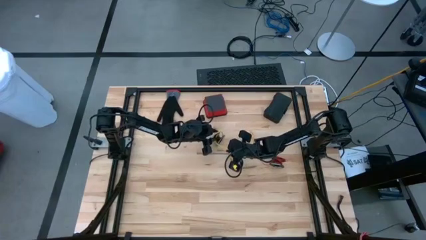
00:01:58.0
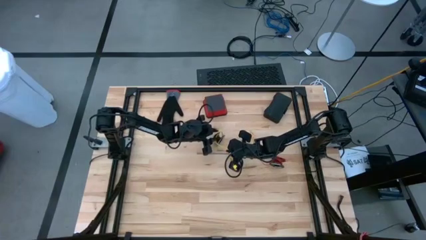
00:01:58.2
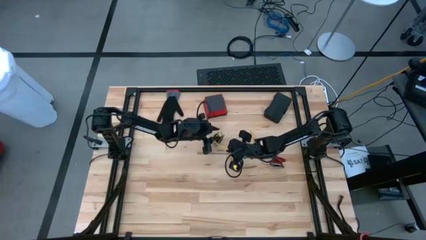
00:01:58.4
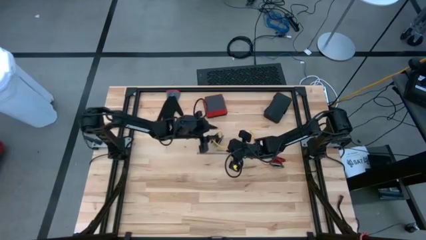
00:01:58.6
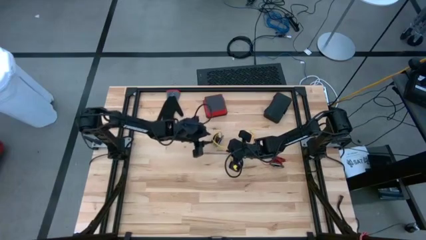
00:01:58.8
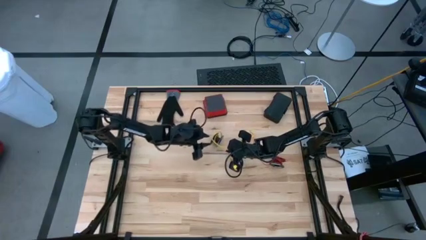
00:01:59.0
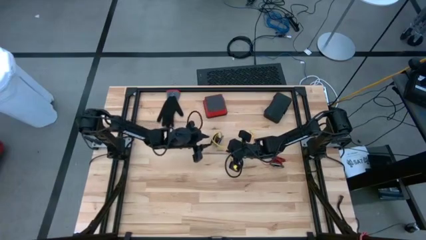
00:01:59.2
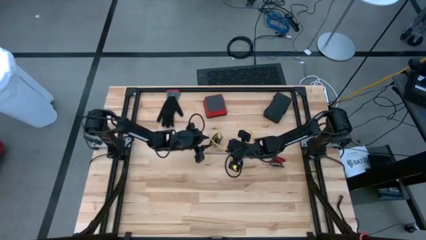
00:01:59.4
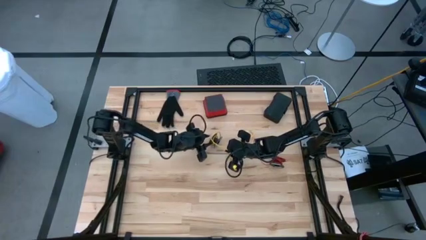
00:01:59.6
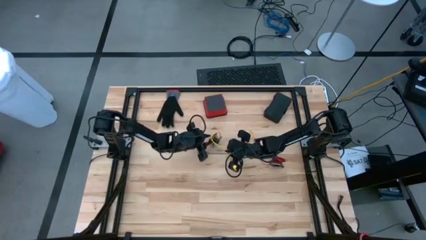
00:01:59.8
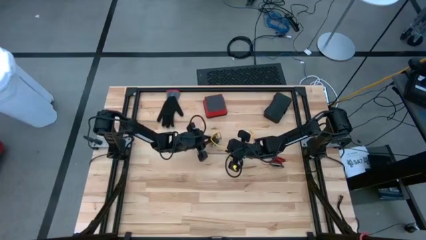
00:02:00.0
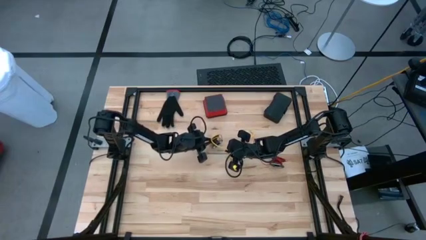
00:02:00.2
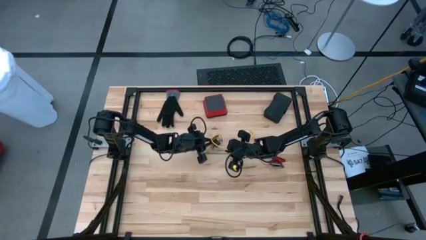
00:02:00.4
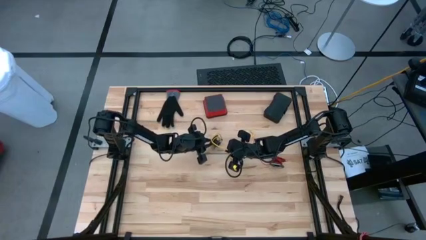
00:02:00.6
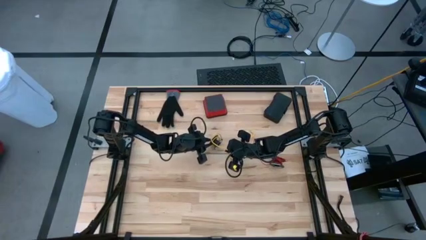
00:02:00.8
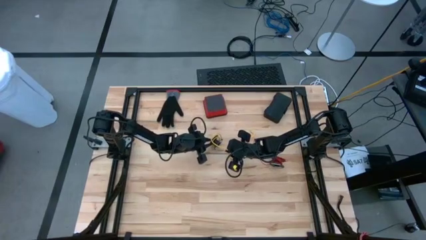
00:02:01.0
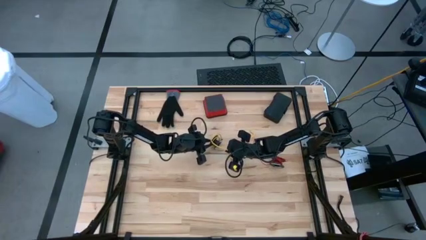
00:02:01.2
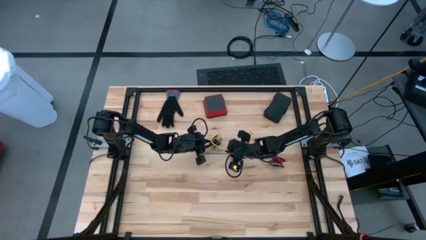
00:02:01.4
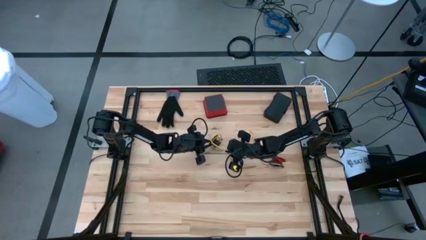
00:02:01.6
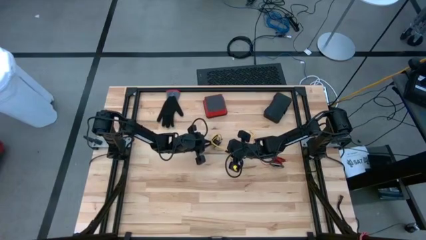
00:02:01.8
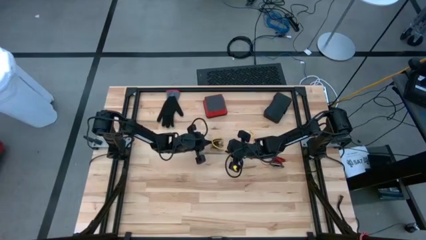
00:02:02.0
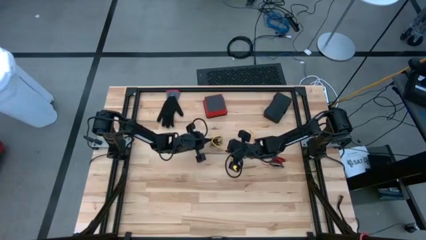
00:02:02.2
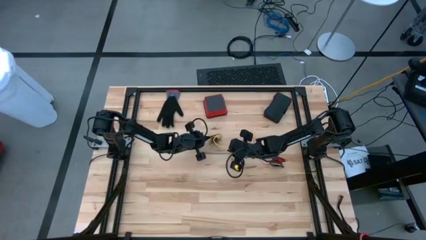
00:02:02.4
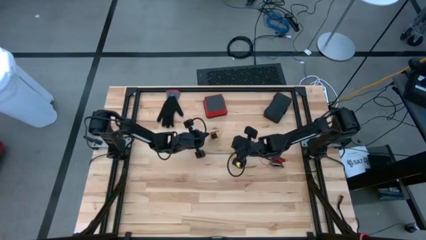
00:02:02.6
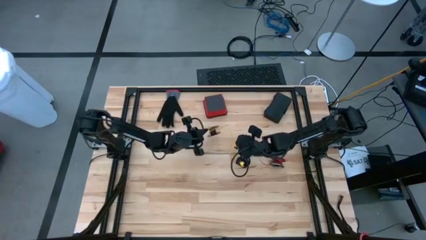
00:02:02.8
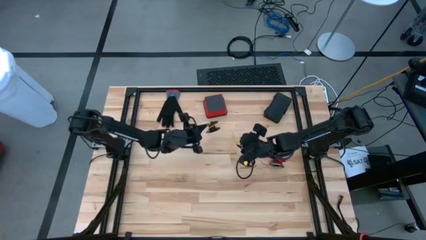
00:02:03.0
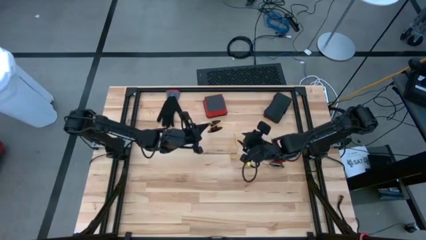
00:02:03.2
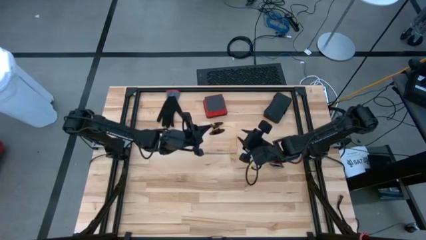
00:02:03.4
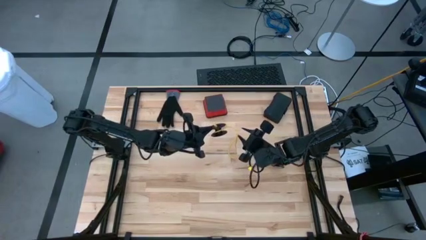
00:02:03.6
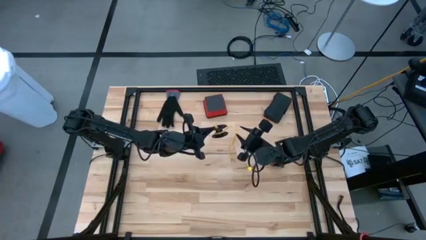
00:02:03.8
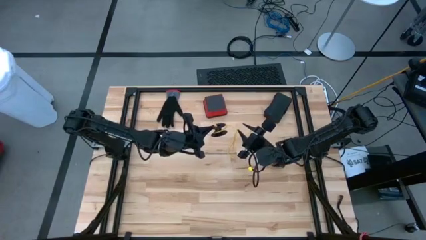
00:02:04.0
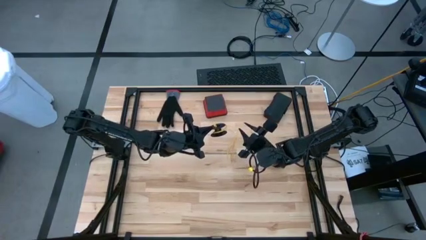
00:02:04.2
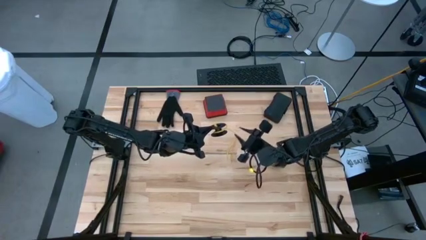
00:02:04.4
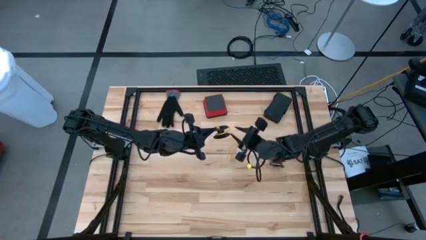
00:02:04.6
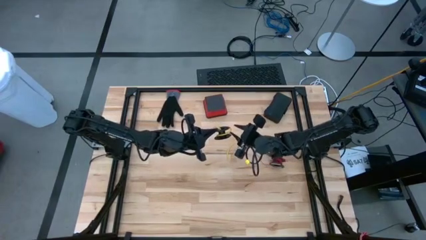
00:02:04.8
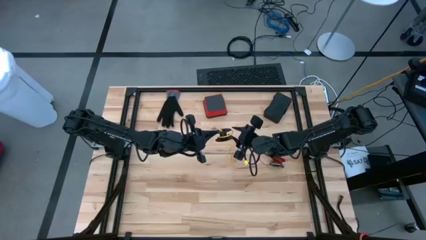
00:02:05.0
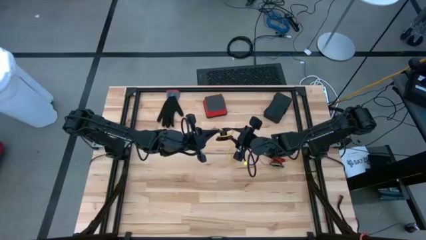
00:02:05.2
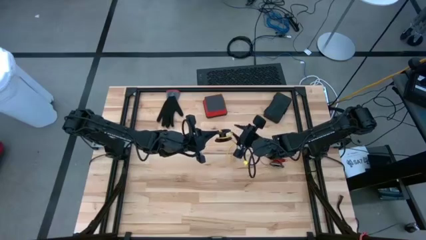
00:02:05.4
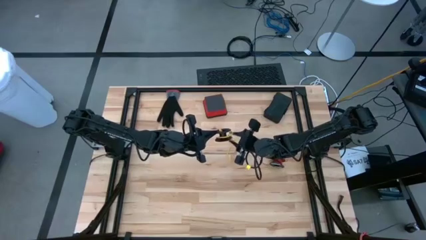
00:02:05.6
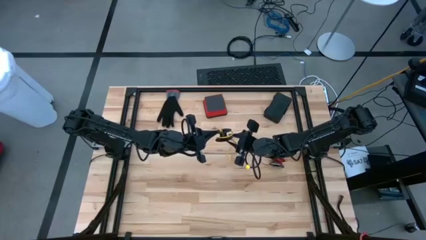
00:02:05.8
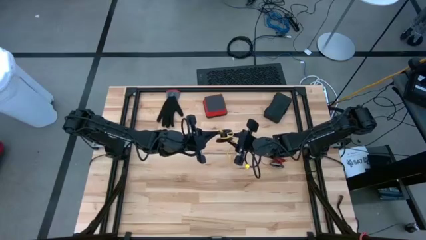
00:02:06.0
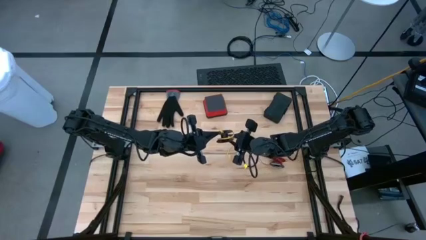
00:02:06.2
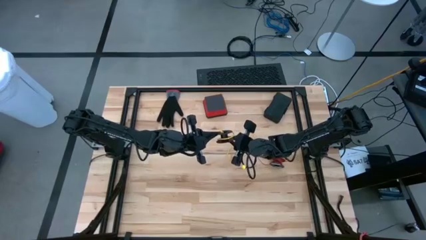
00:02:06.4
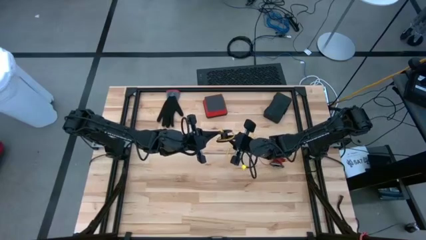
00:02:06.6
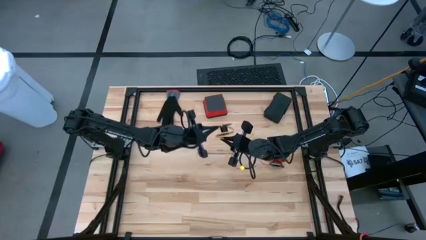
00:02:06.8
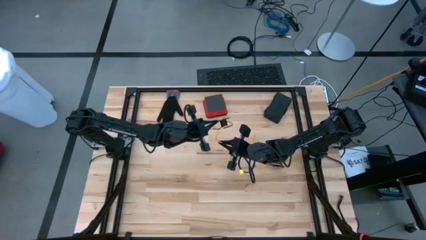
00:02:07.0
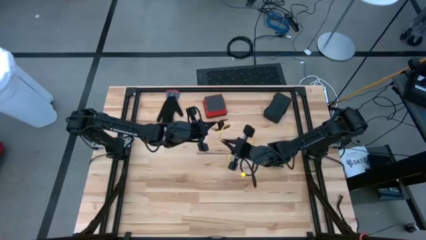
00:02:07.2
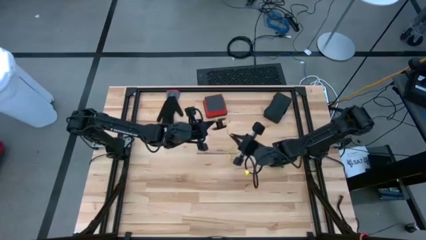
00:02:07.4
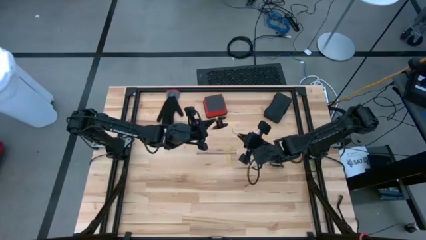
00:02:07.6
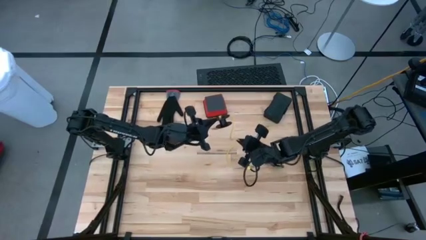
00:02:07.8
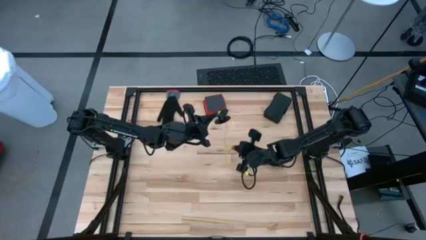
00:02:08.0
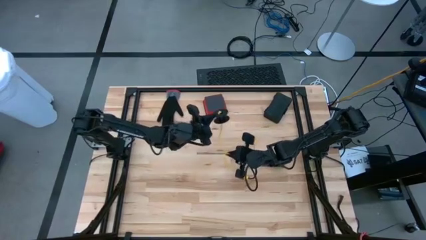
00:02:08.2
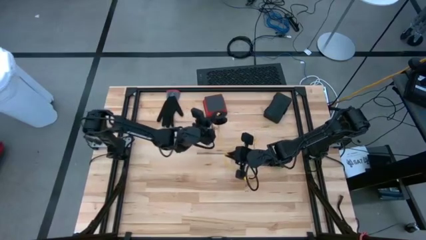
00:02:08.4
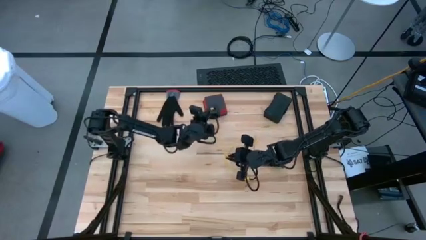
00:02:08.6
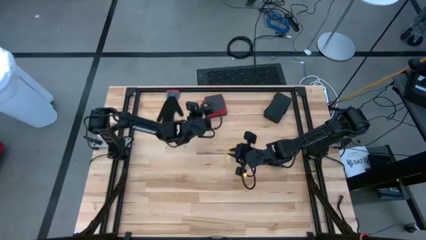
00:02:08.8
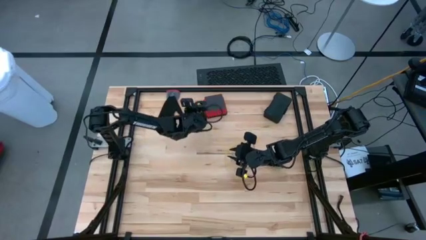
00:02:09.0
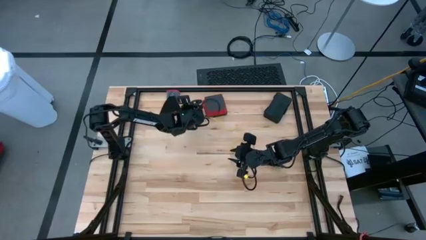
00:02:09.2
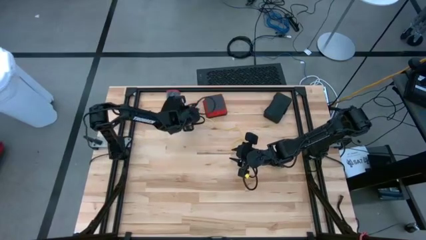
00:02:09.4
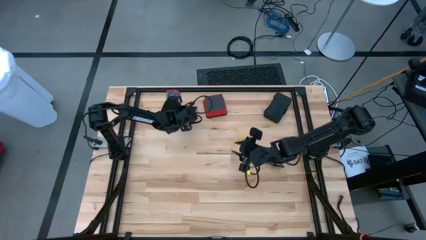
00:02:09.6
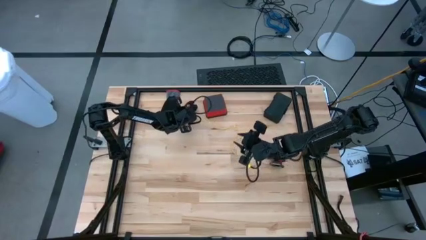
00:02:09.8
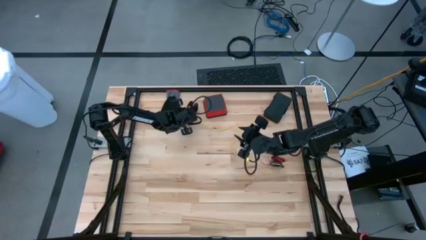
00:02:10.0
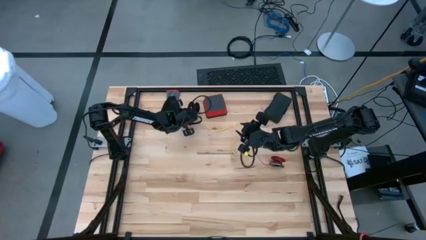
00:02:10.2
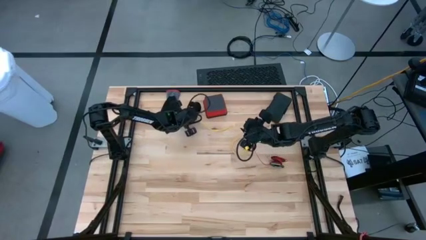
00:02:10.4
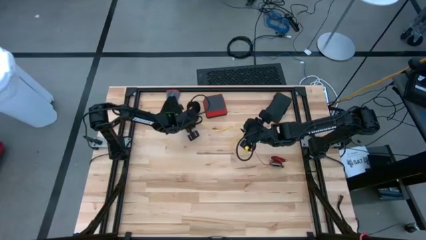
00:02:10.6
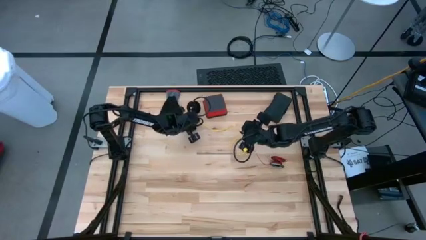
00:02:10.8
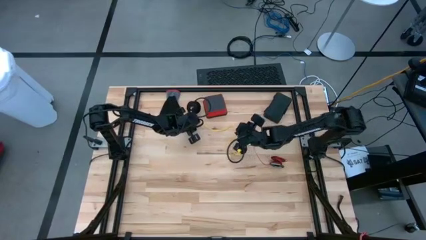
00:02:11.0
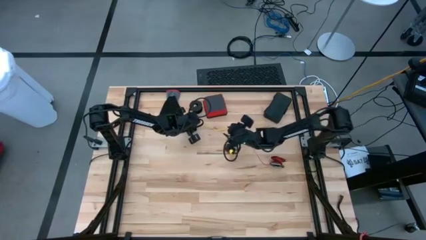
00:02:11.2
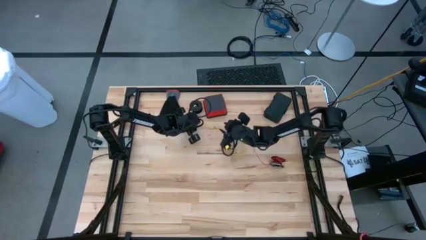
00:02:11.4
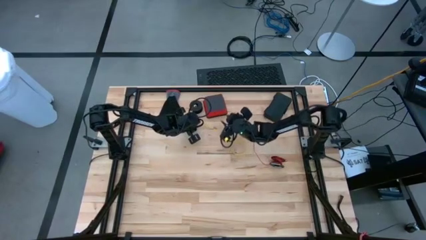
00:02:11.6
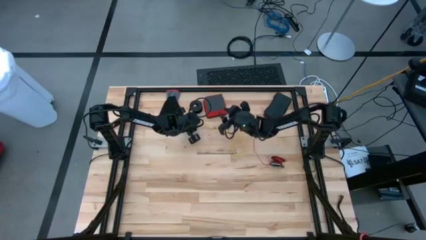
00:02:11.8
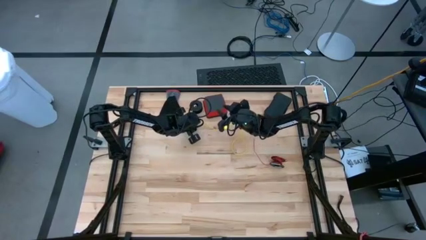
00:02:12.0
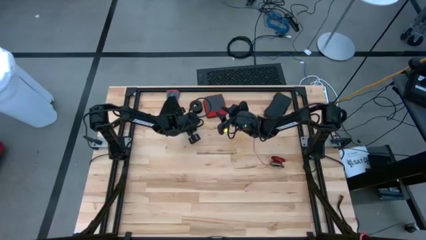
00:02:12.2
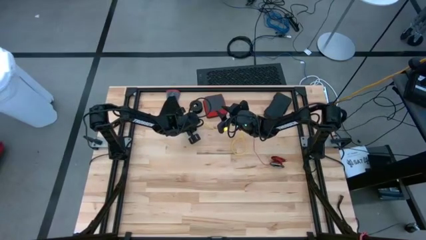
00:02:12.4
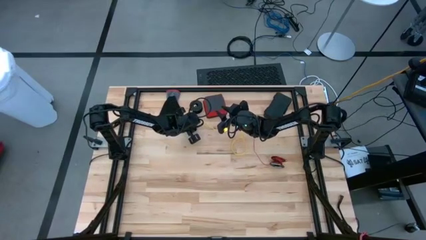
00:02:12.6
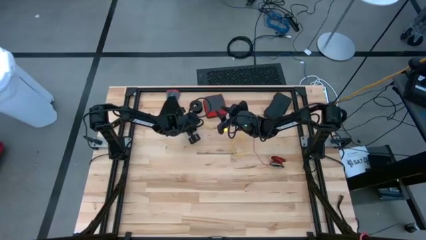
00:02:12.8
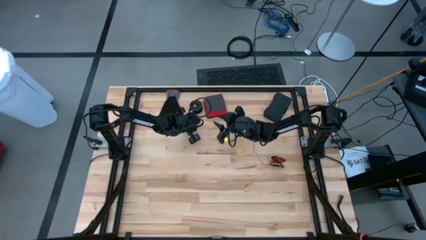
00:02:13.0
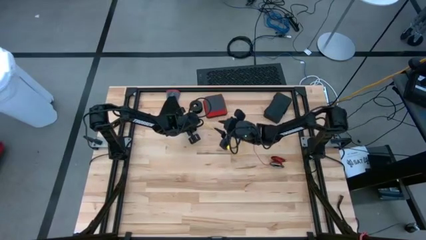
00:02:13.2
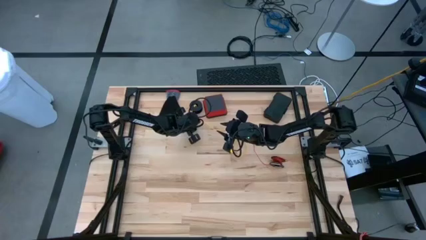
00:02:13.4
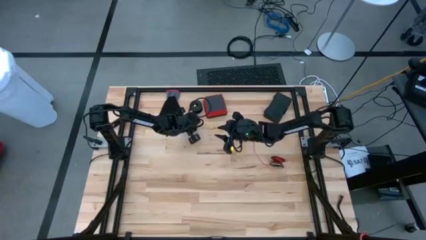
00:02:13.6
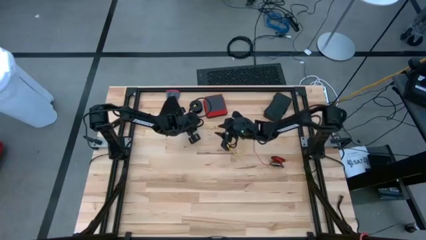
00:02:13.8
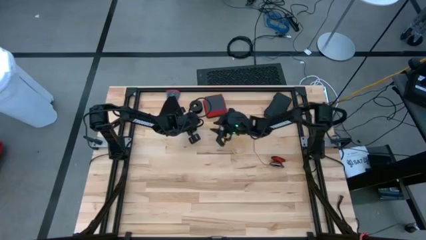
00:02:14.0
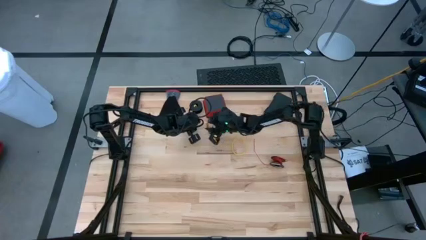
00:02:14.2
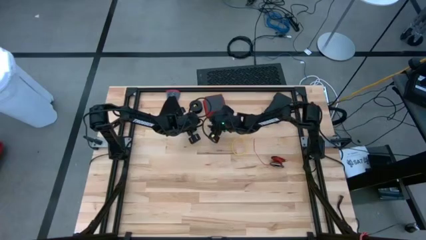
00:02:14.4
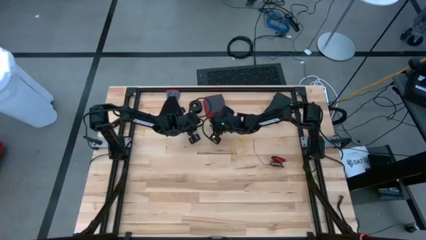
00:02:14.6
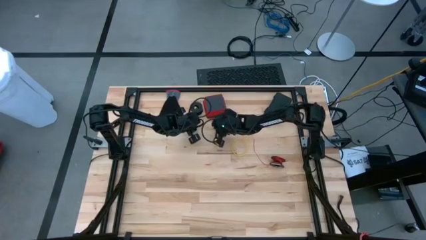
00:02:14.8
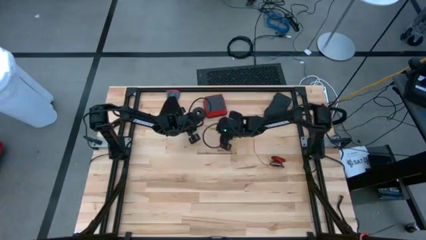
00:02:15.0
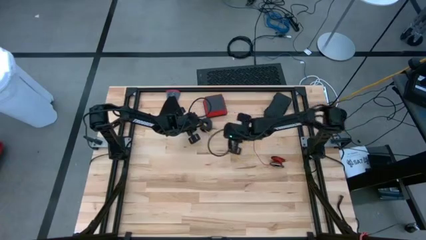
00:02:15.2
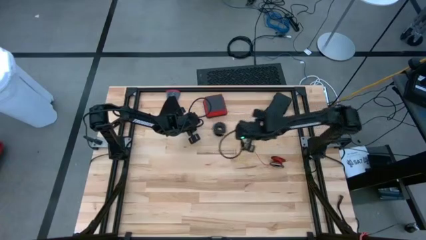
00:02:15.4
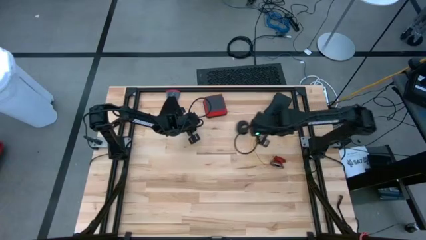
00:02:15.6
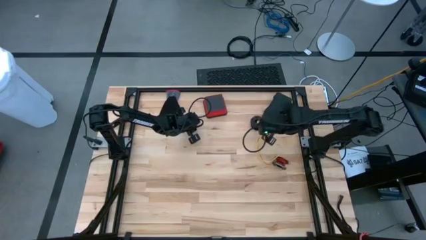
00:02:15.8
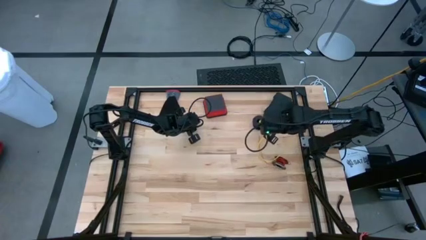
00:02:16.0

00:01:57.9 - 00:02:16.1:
Task: Coil cords
Uncoil the yellow wire from the spool
